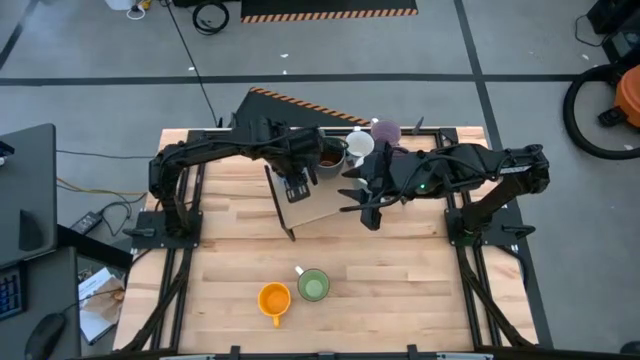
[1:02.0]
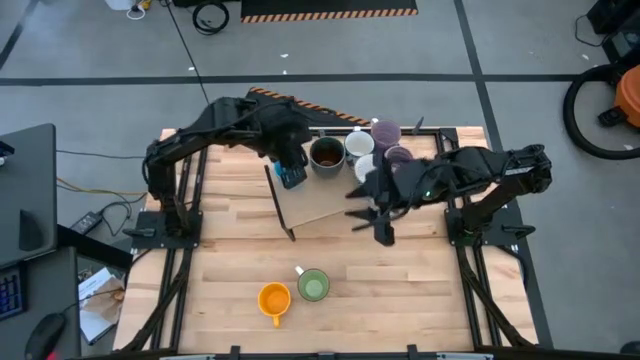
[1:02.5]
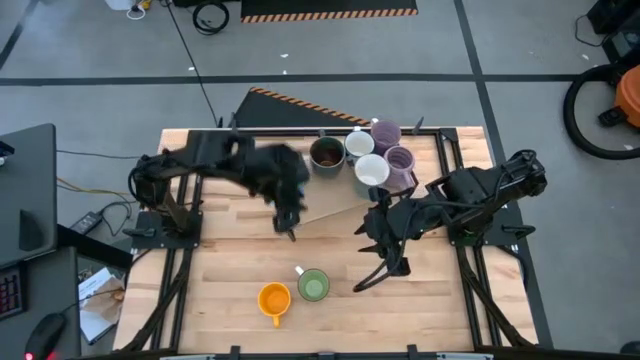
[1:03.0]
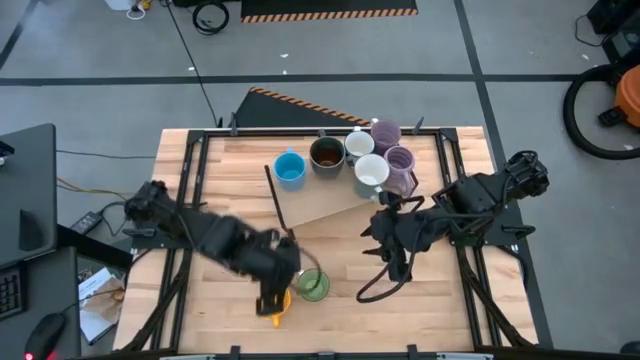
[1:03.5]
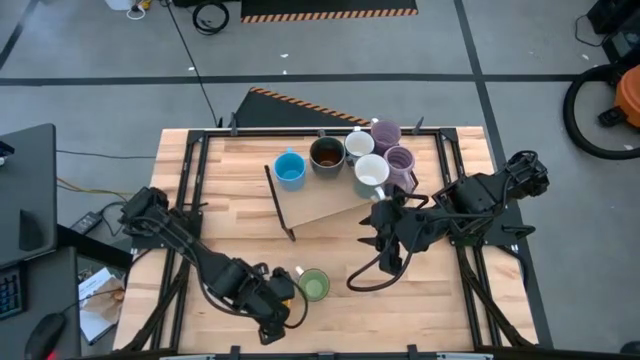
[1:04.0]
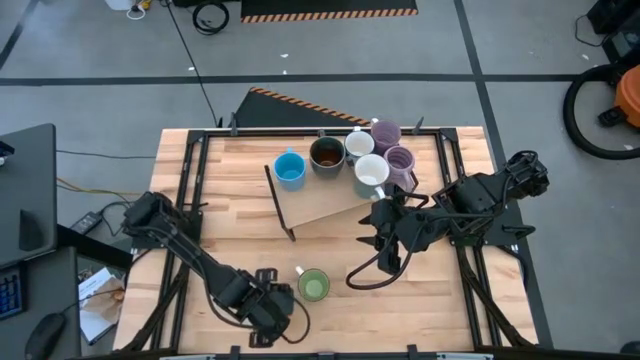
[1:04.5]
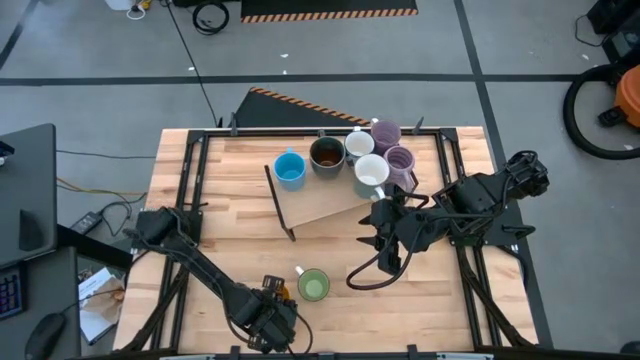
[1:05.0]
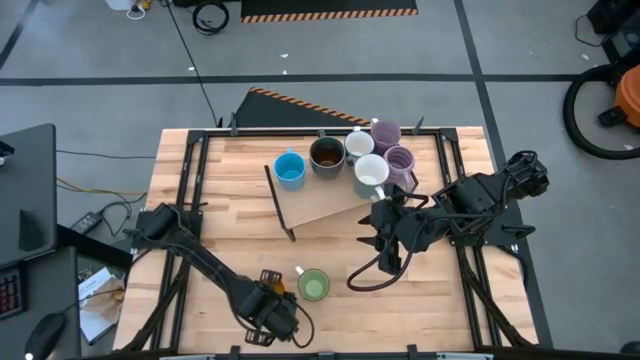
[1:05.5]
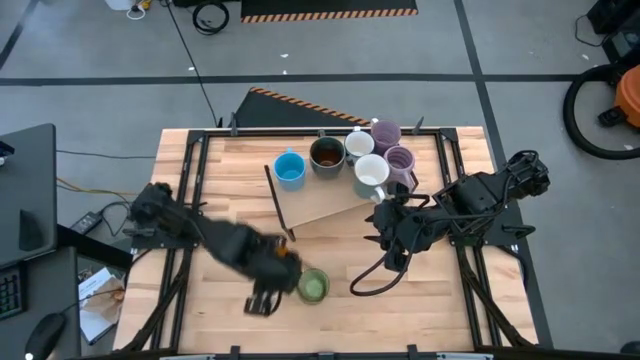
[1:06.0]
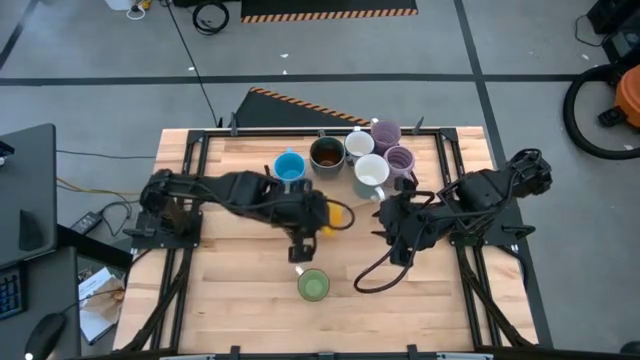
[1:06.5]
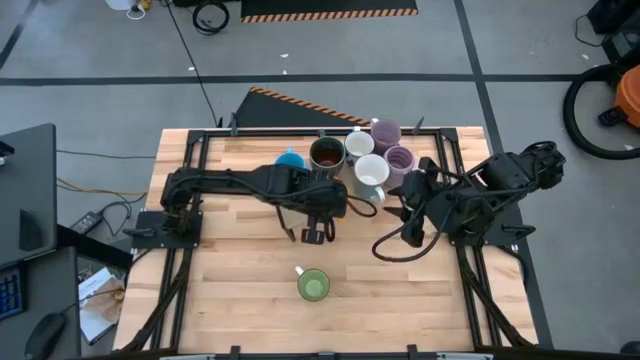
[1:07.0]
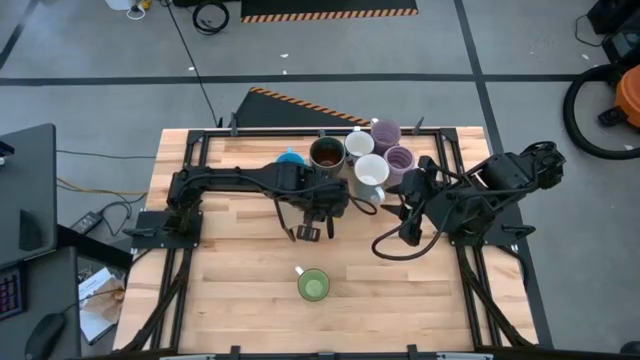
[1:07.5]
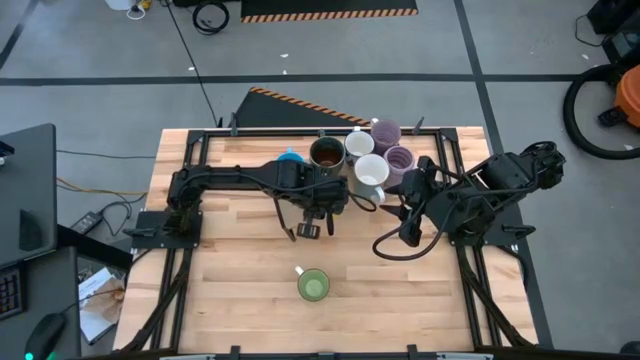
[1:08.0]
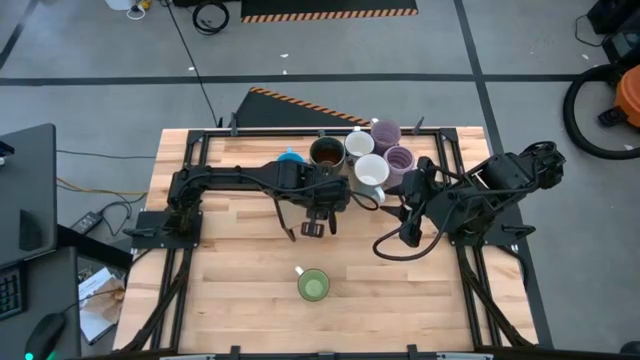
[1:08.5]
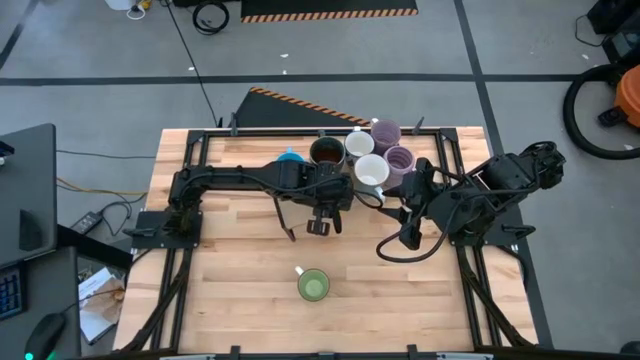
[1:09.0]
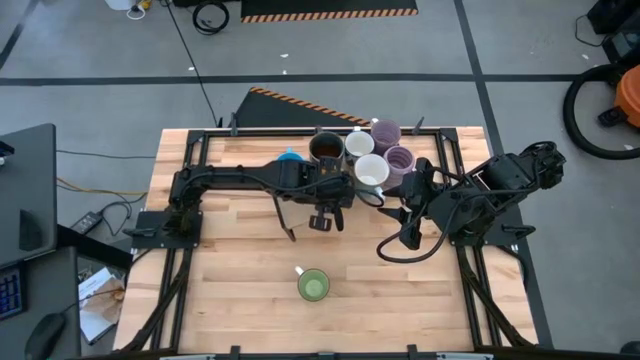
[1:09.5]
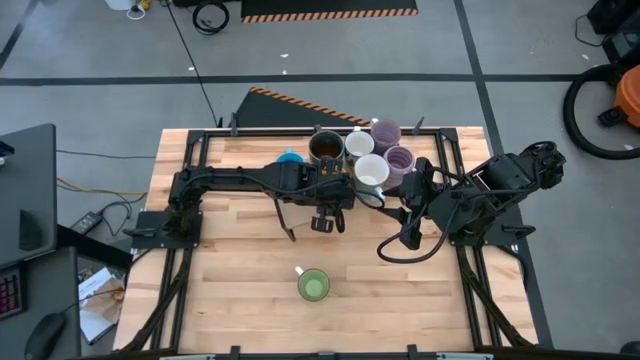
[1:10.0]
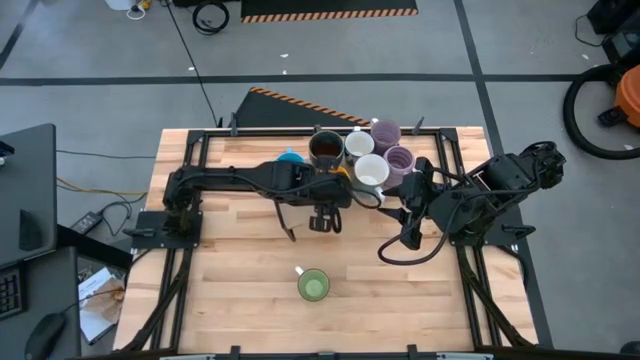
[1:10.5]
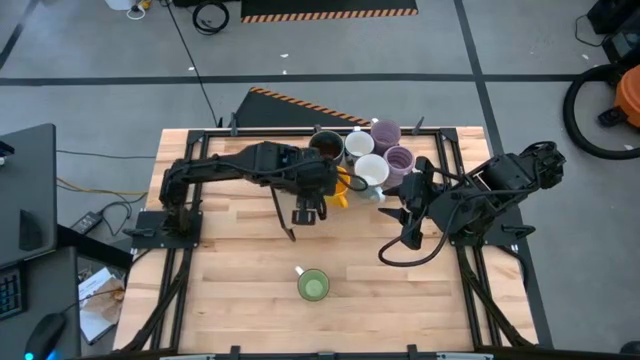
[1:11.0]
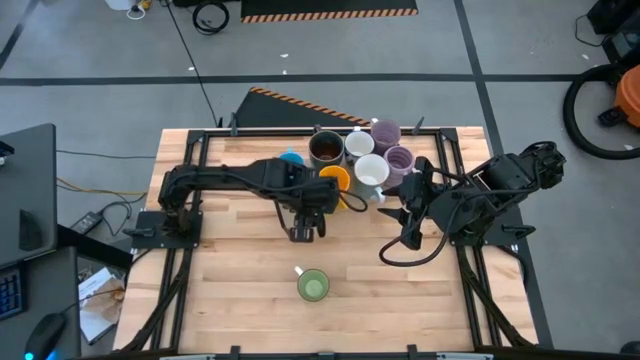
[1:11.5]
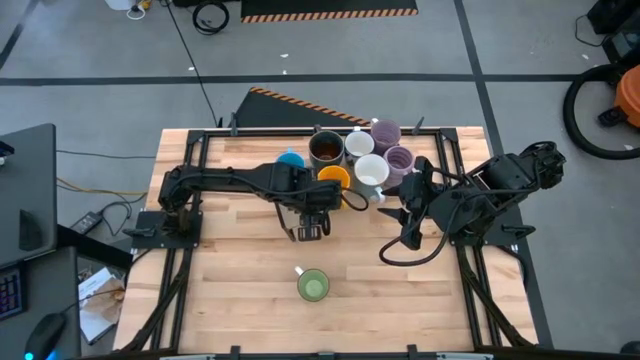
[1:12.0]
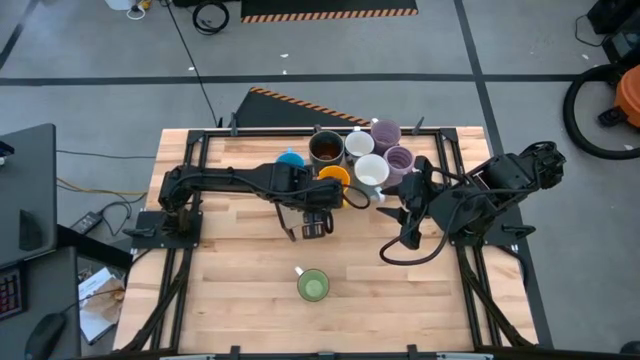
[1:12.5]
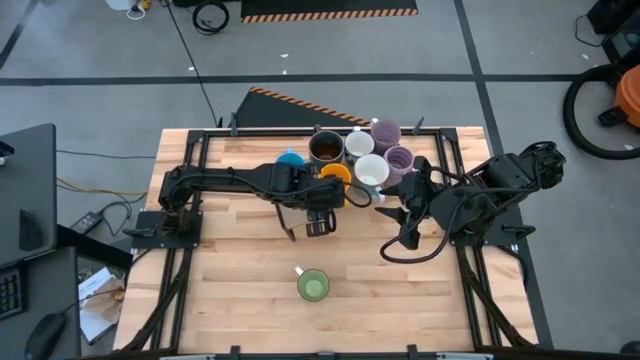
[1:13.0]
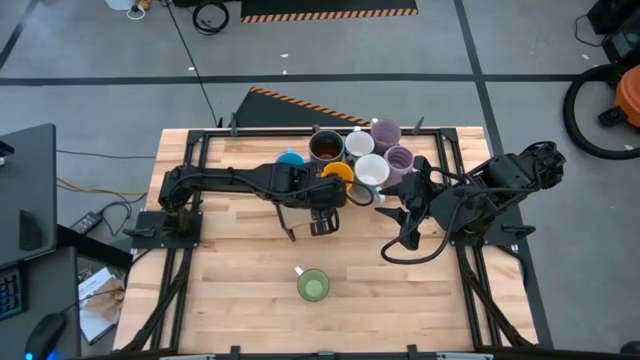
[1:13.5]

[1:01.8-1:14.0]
Task: Place coffee mugs
Put the yellow mug on the shelf

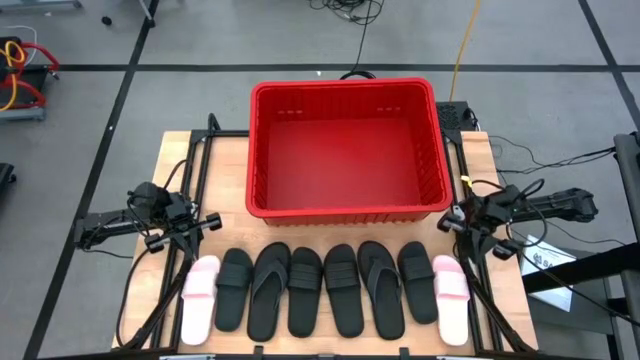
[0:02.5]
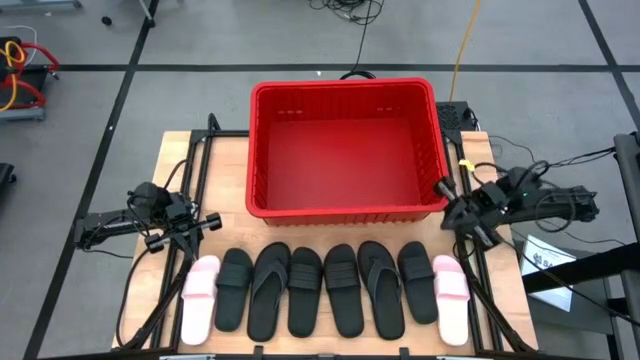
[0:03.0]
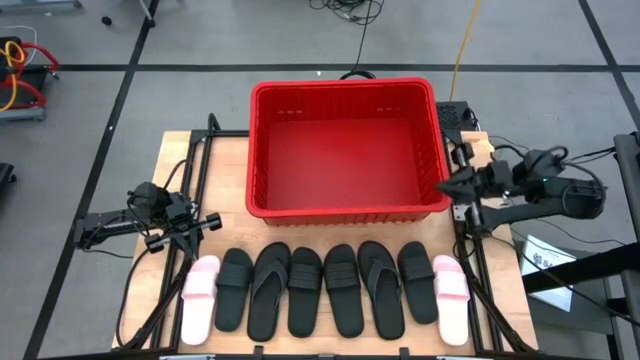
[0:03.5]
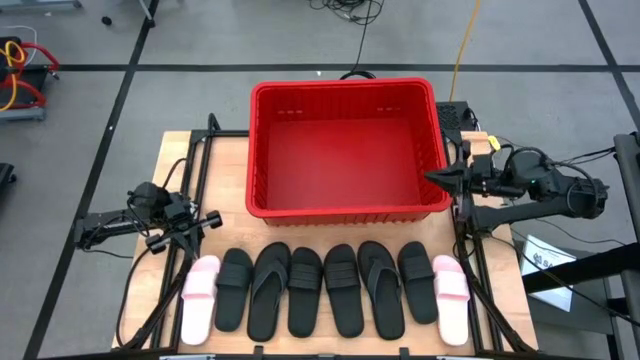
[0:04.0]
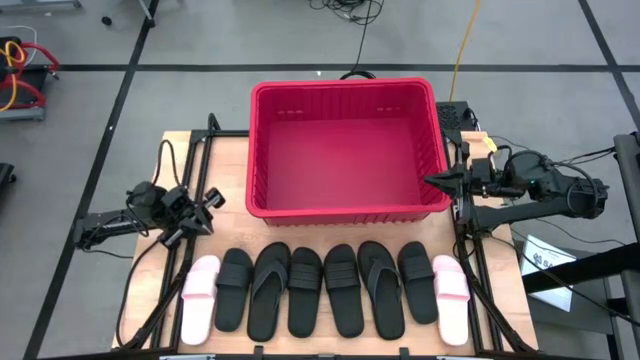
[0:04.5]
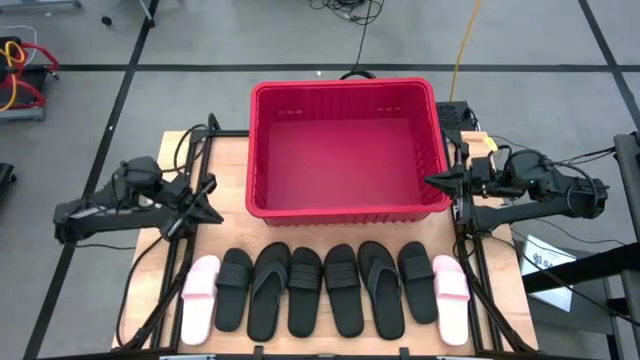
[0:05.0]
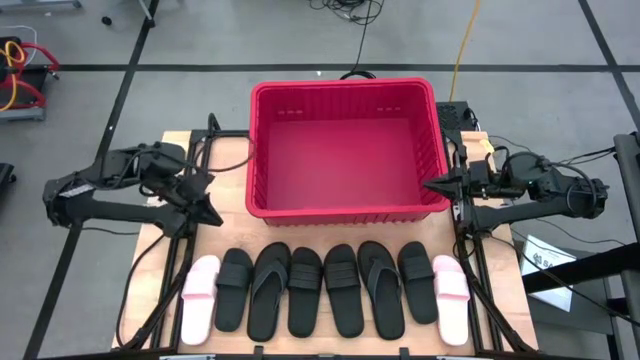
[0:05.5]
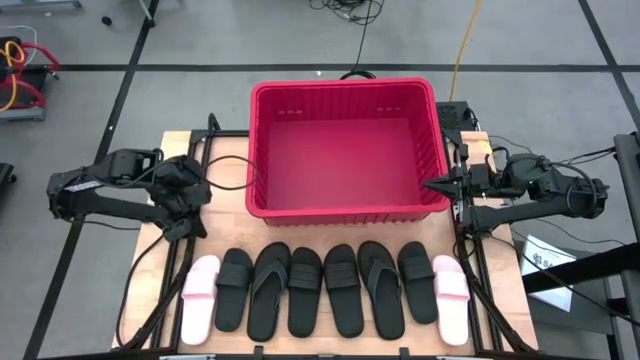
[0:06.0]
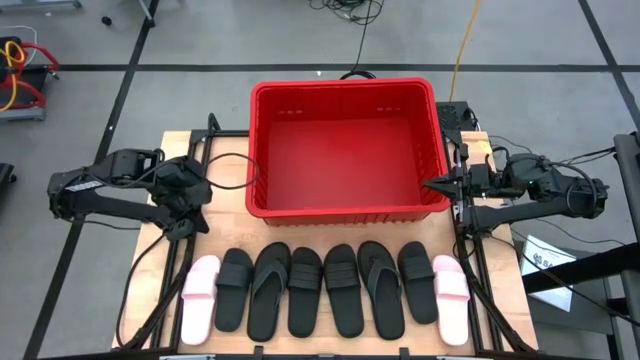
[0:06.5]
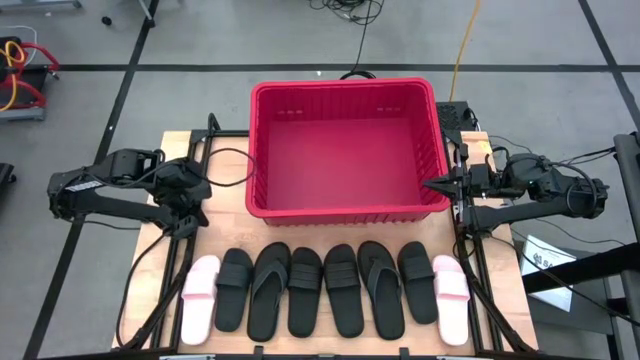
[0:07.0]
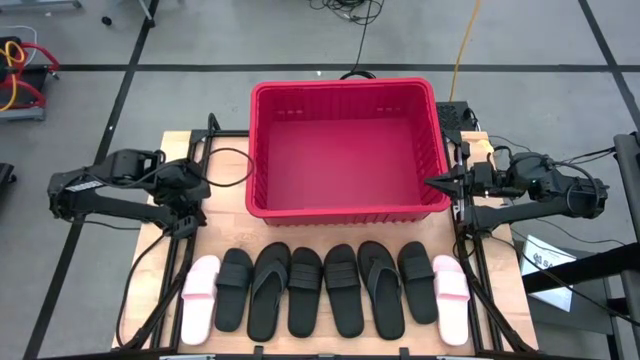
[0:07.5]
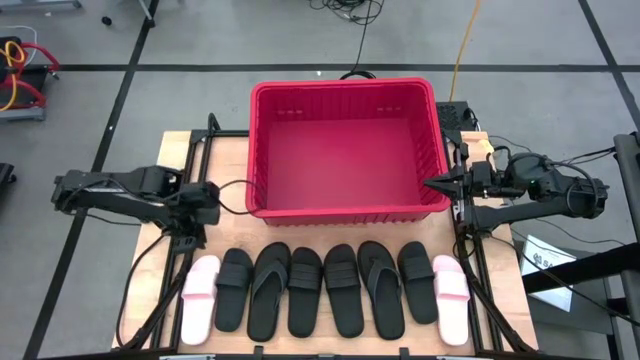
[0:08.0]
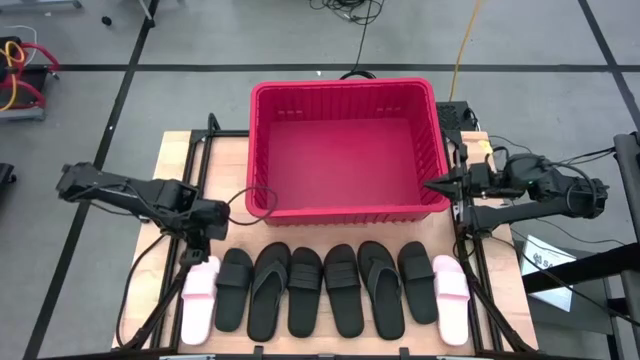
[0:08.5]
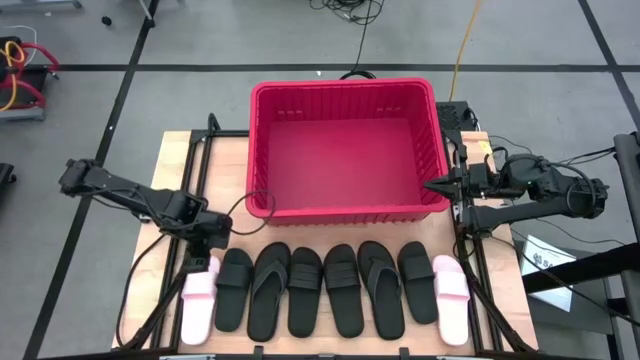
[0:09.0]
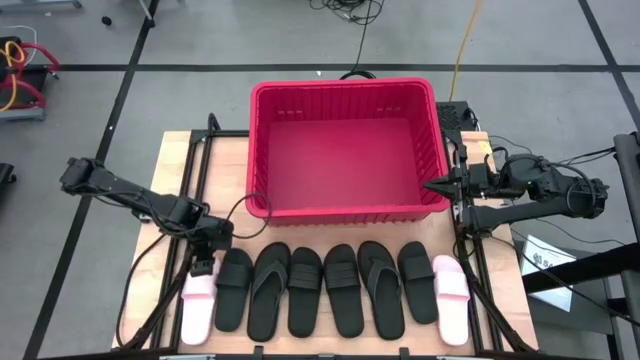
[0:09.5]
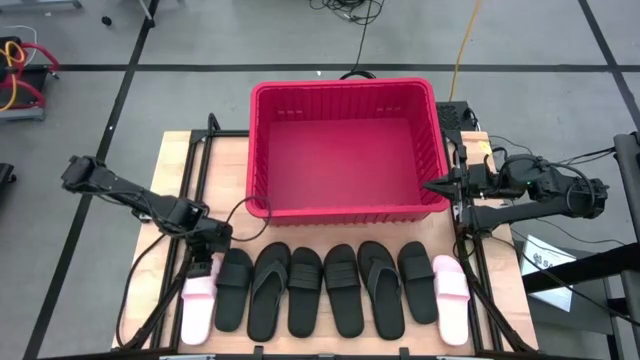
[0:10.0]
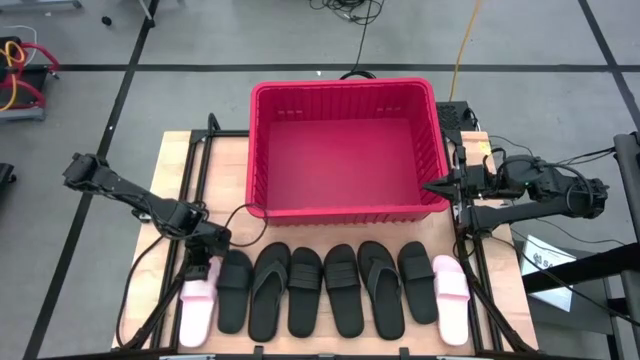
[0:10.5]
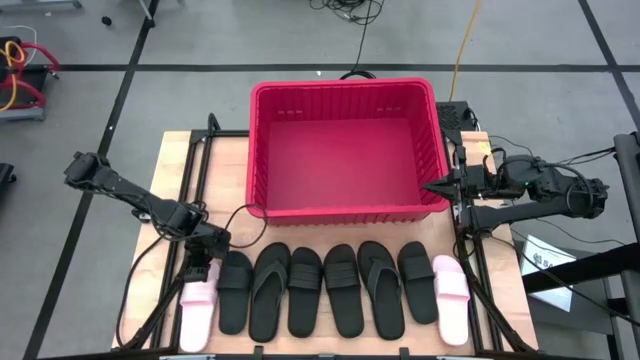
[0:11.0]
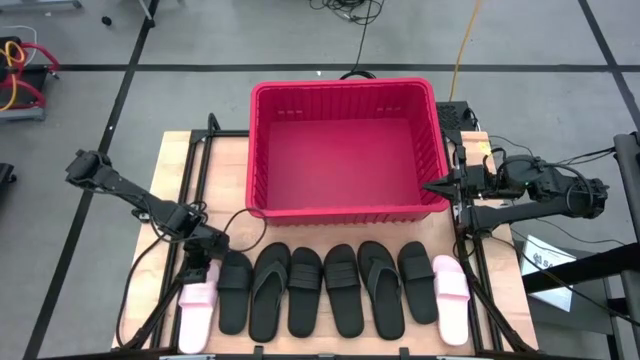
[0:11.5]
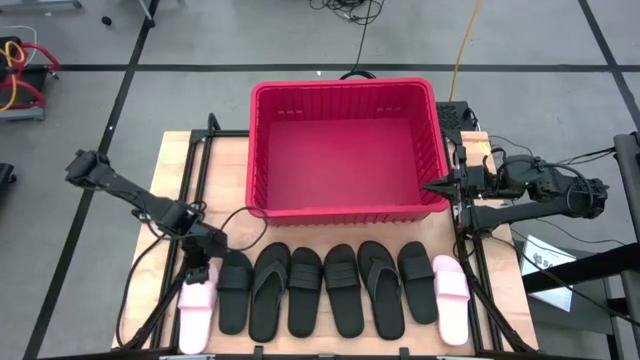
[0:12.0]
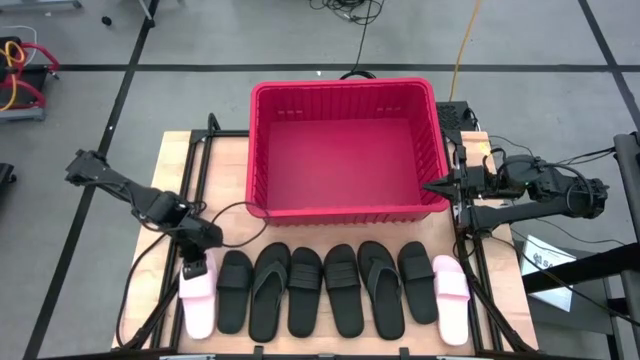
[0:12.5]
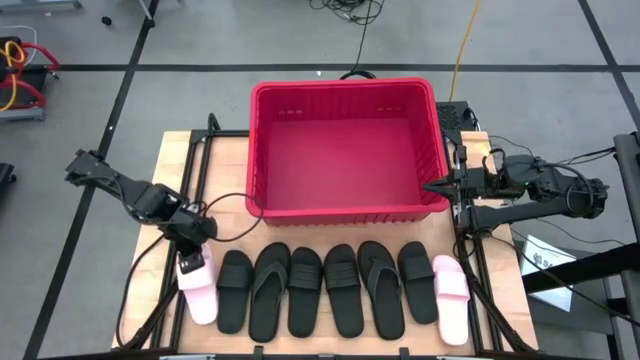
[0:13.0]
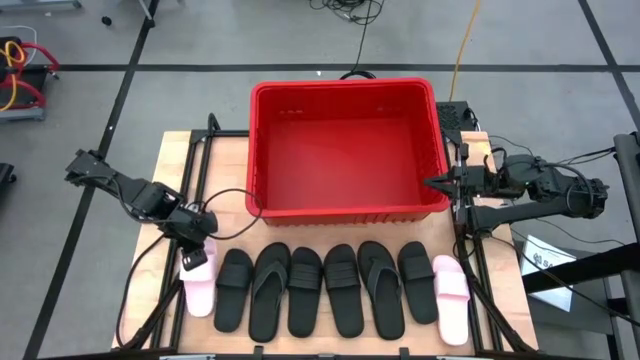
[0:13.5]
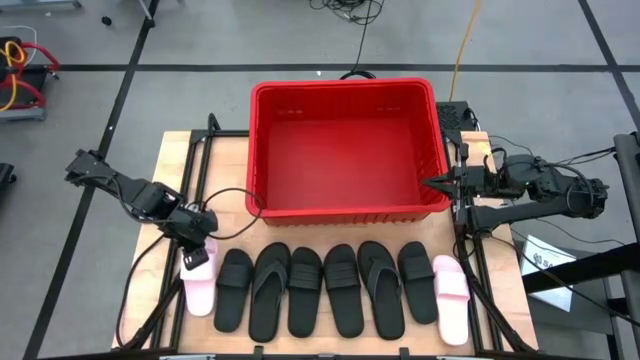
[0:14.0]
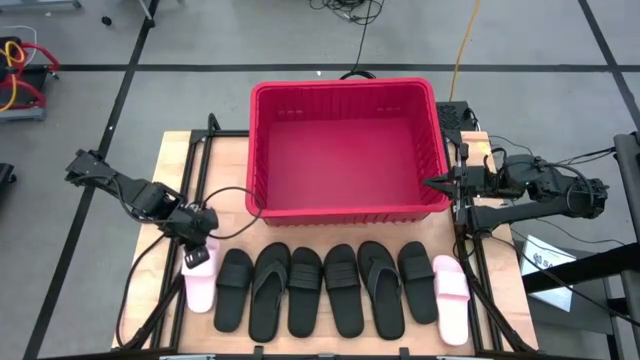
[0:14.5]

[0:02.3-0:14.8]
Task: Pick and place slides into bin
Put the pink slide into the red bin
